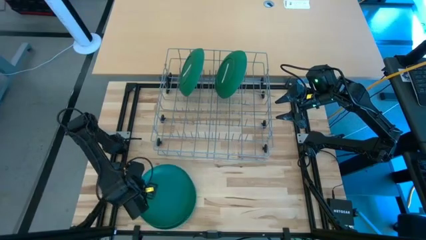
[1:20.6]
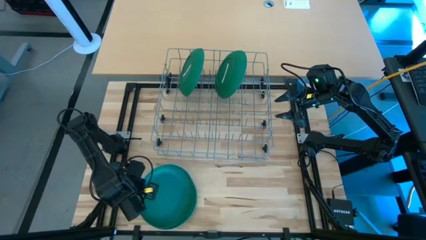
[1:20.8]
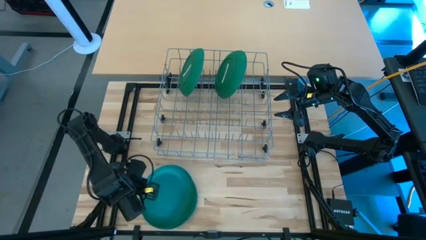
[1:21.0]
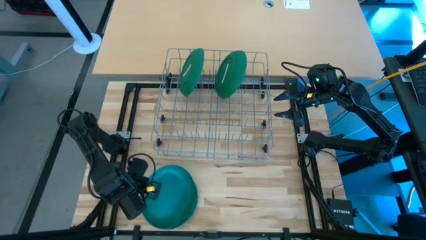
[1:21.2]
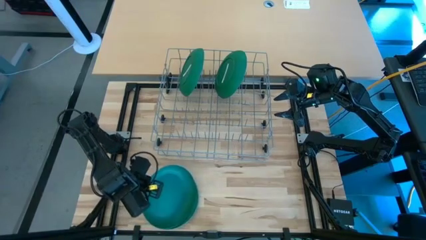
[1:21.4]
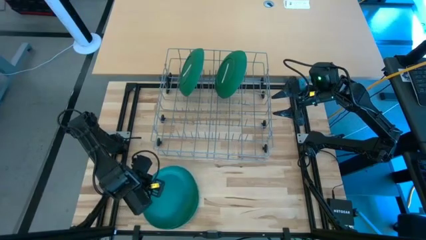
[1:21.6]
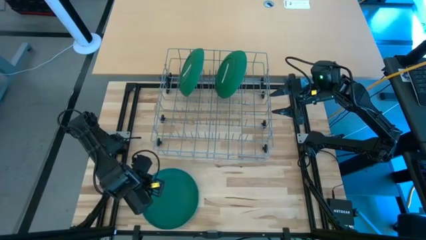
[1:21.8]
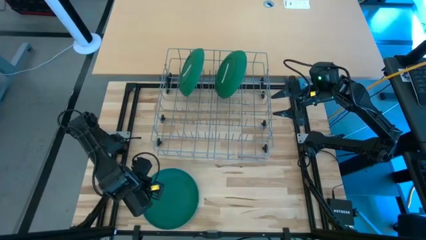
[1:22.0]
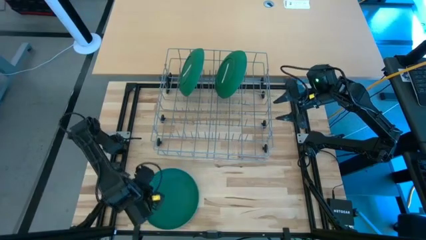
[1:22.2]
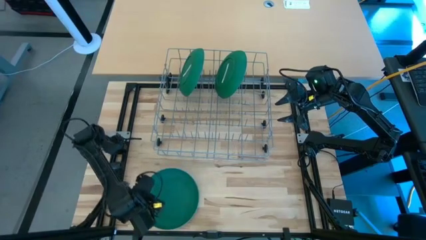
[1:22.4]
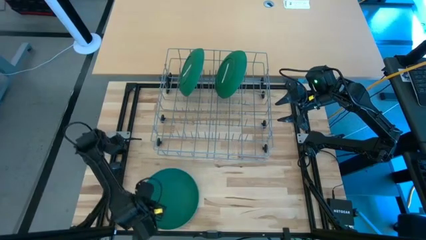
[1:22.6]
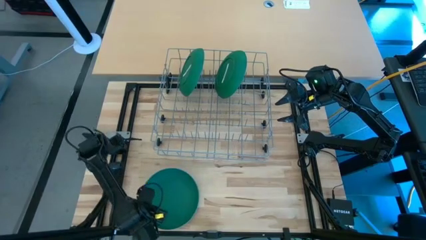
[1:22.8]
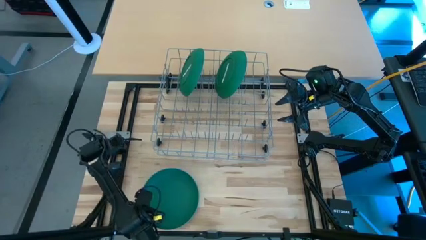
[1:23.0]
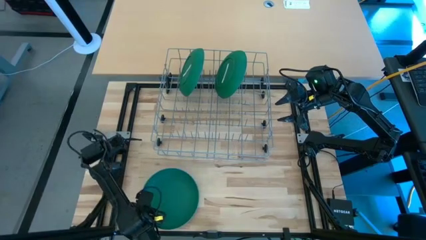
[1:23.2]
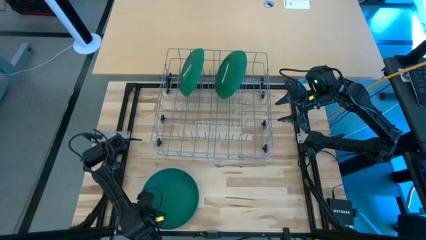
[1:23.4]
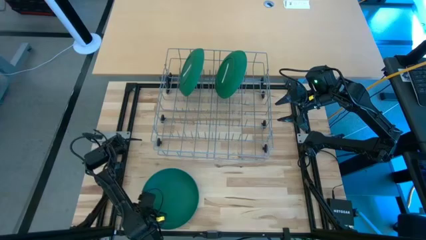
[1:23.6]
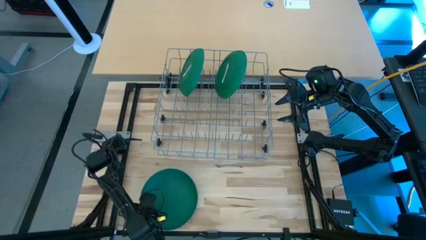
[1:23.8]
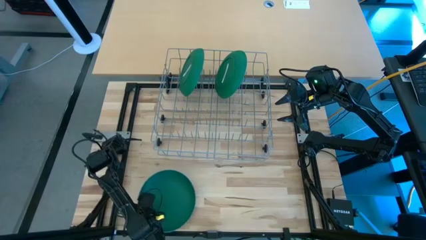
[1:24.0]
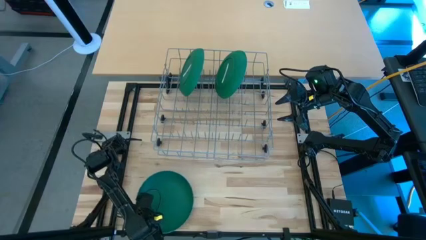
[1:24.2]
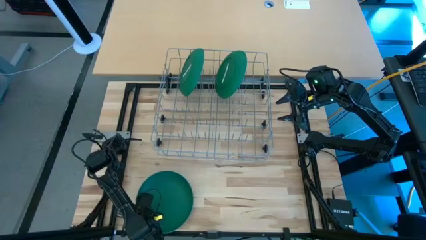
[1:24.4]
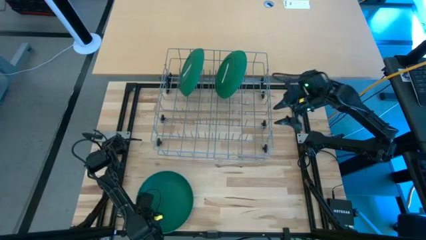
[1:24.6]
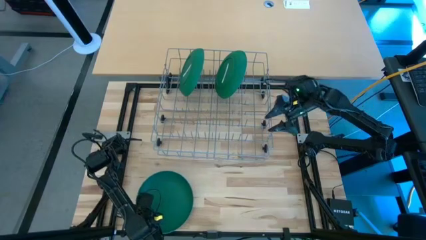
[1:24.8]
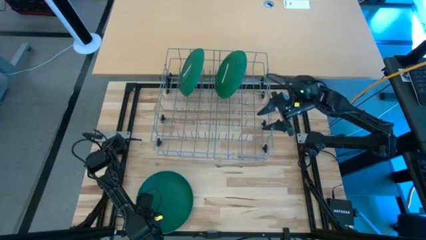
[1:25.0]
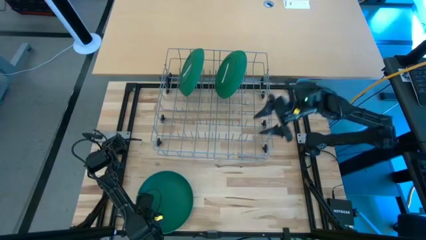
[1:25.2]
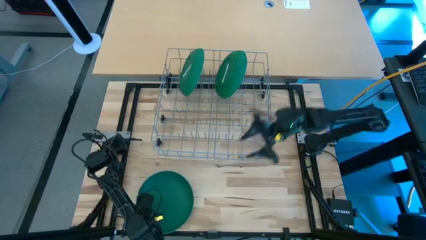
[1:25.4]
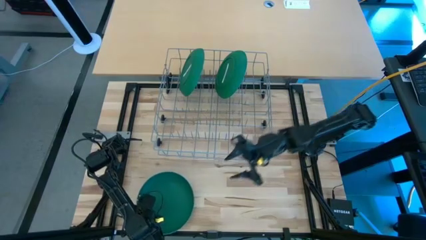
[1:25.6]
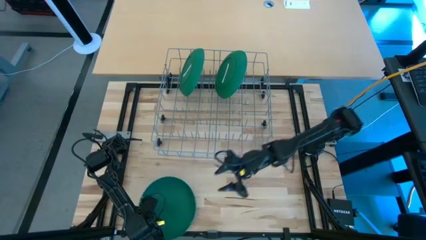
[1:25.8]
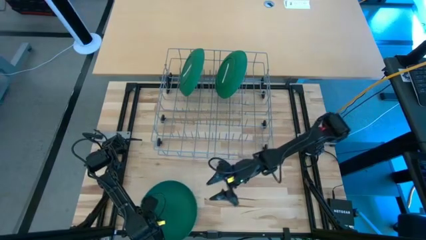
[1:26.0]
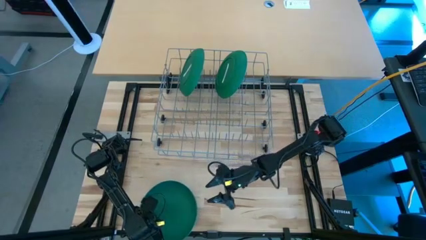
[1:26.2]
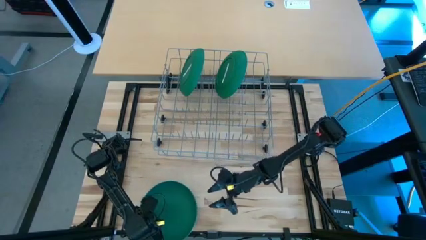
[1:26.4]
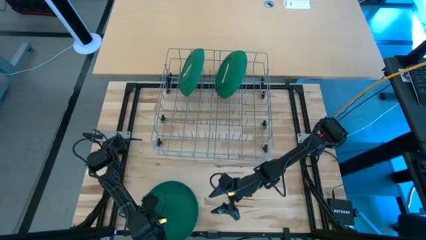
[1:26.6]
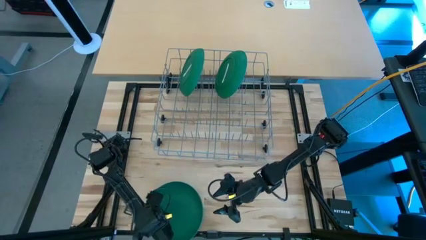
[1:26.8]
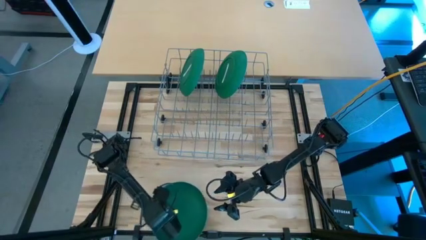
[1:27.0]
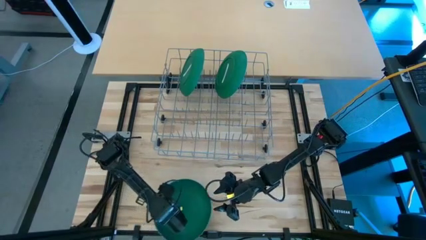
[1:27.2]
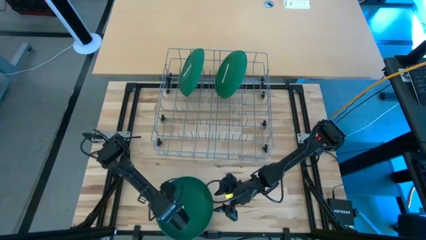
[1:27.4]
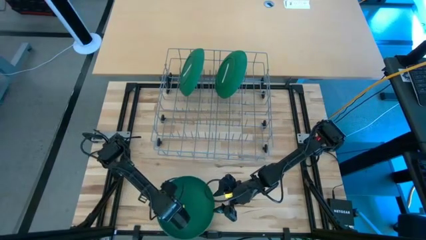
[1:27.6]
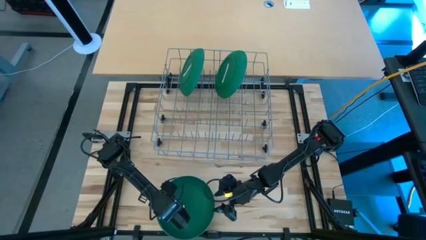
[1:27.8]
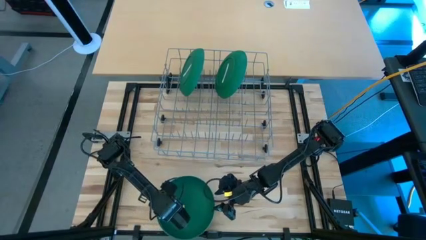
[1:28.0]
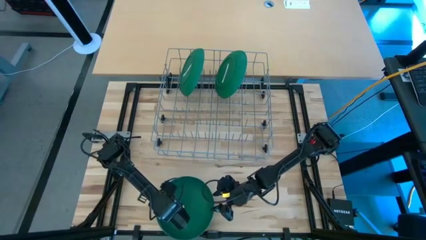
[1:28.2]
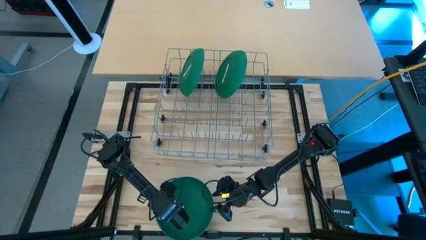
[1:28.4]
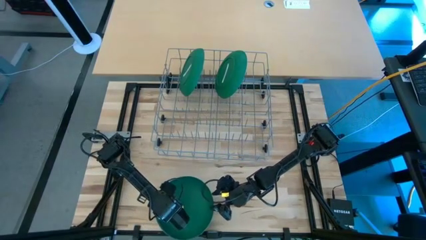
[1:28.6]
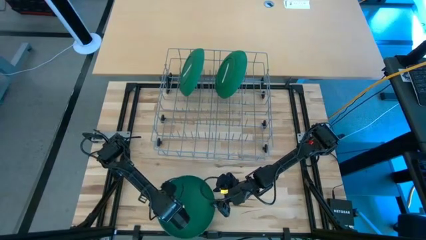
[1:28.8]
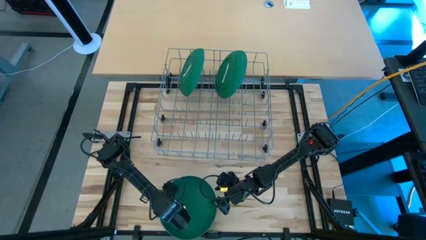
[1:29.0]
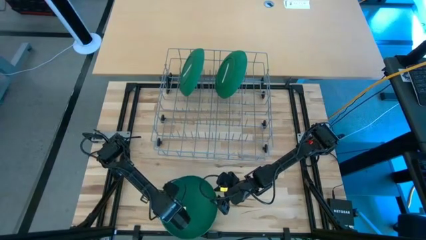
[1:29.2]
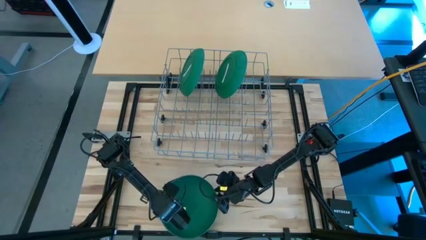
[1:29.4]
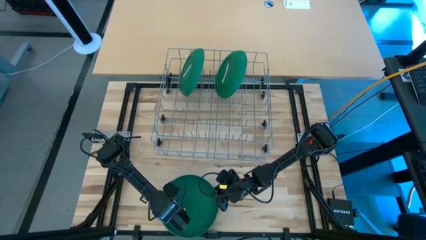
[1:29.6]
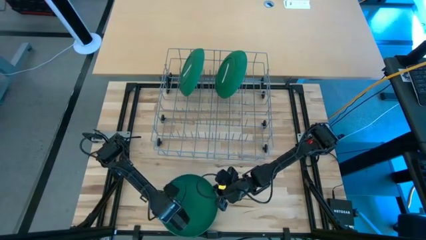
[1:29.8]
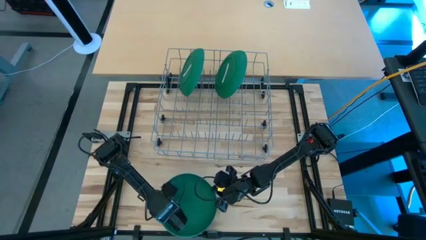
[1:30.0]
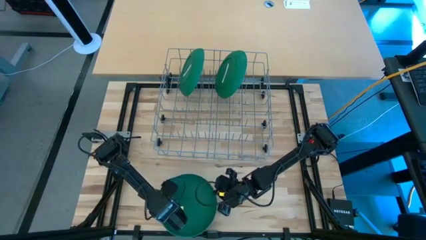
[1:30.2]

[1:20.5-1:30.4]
Task: Sort dishes
Put the top green plate in the dish rack
